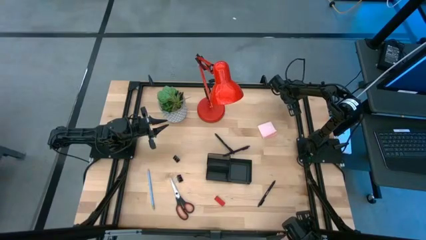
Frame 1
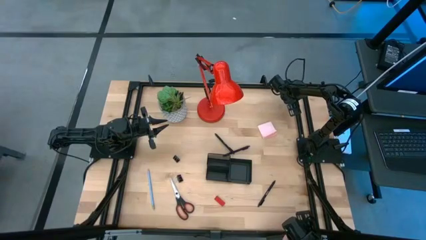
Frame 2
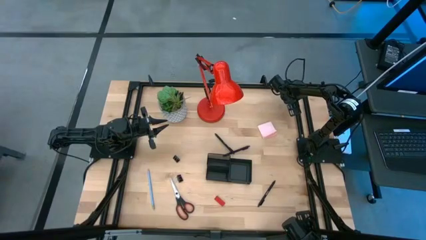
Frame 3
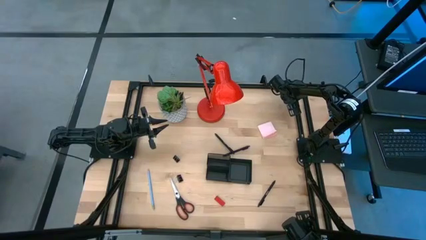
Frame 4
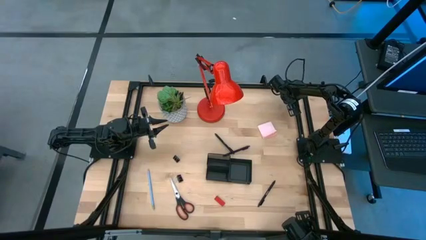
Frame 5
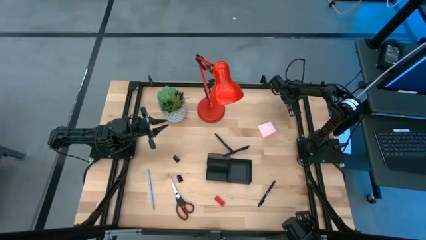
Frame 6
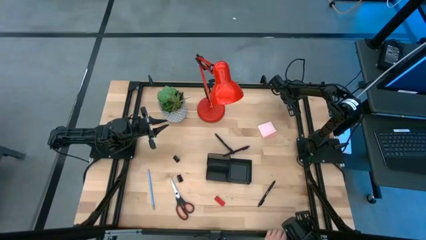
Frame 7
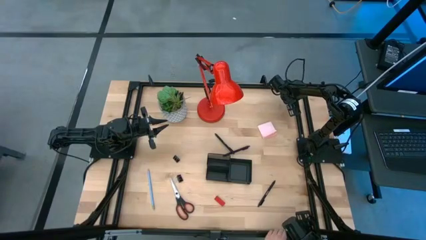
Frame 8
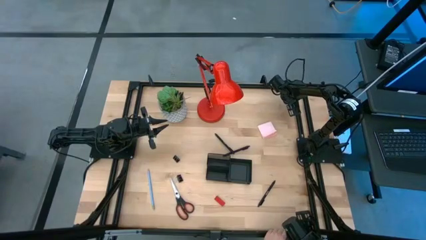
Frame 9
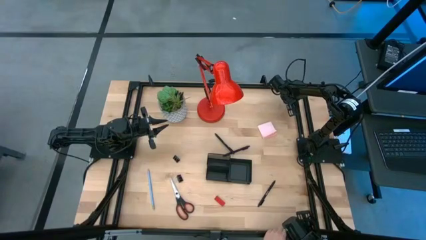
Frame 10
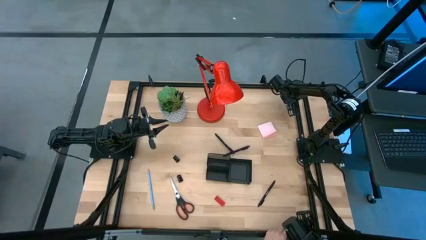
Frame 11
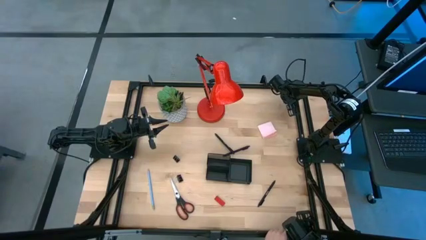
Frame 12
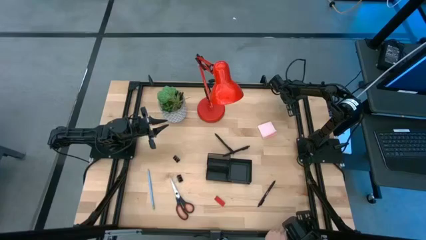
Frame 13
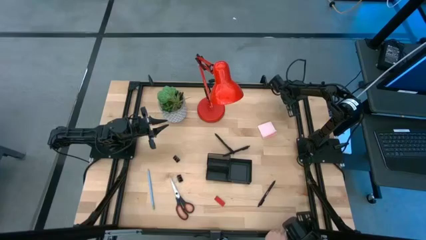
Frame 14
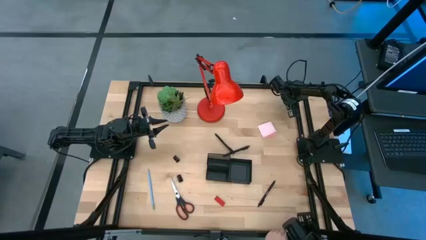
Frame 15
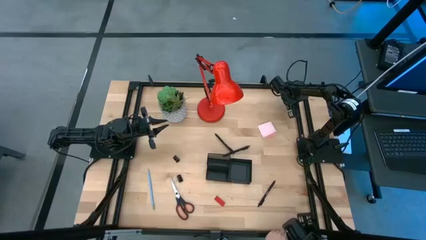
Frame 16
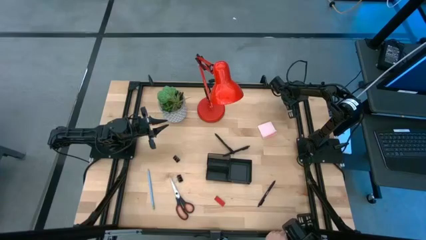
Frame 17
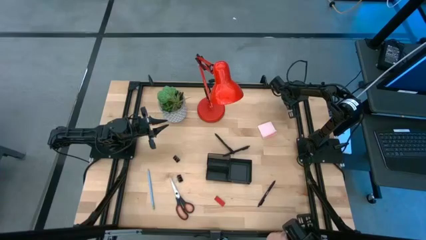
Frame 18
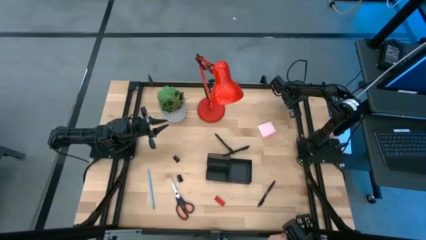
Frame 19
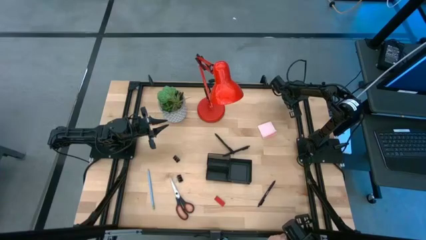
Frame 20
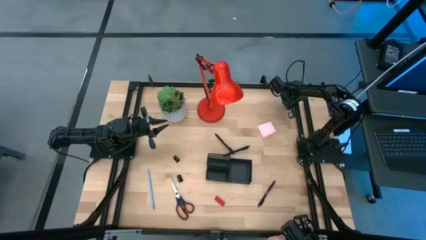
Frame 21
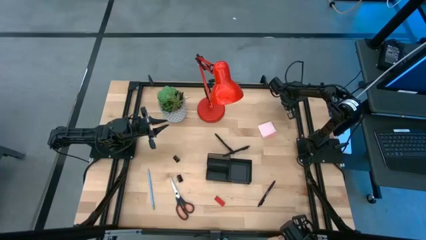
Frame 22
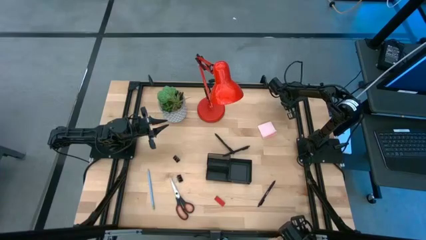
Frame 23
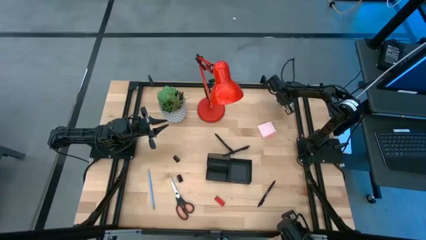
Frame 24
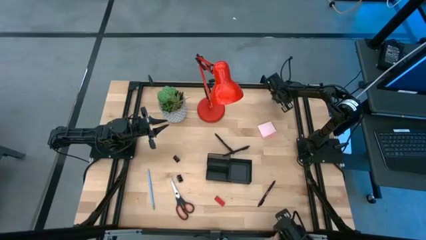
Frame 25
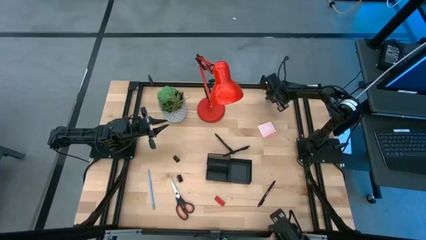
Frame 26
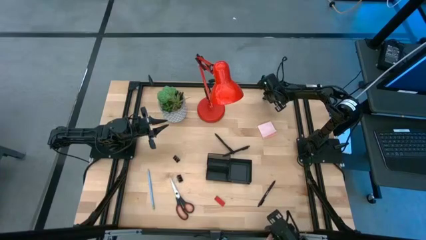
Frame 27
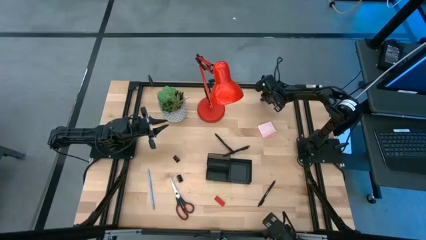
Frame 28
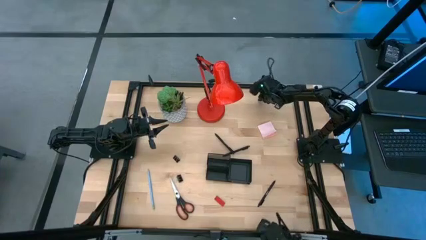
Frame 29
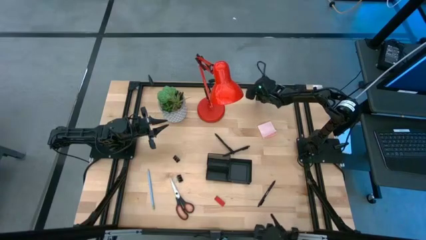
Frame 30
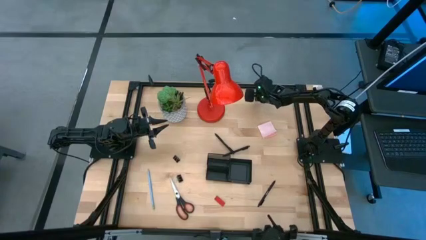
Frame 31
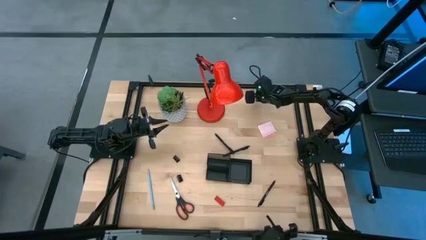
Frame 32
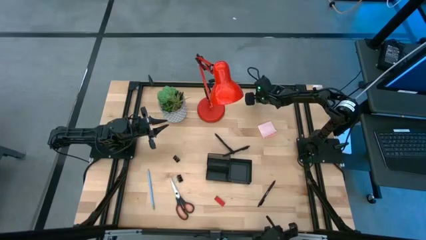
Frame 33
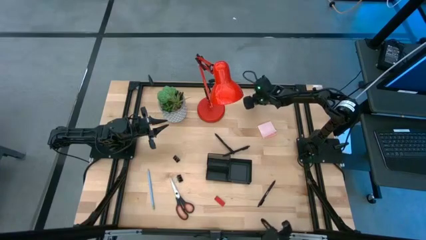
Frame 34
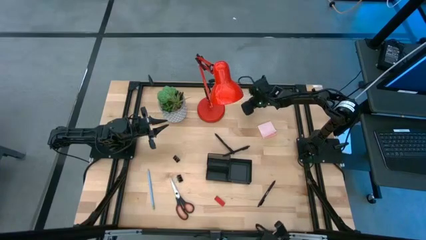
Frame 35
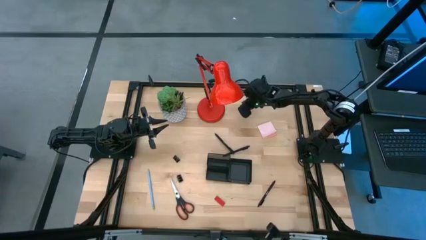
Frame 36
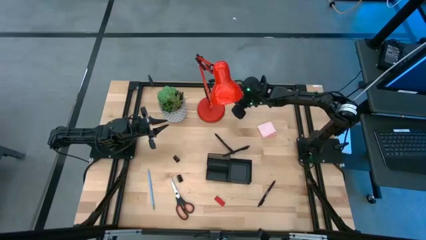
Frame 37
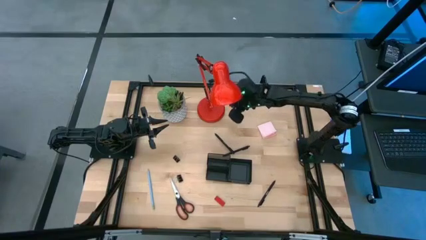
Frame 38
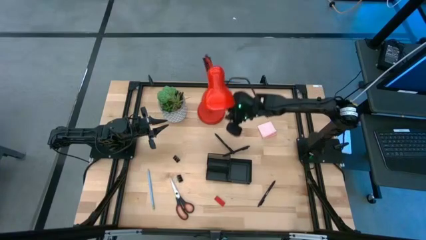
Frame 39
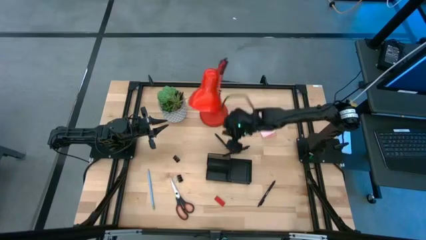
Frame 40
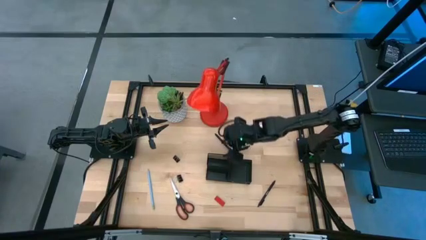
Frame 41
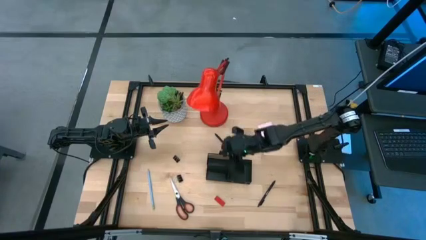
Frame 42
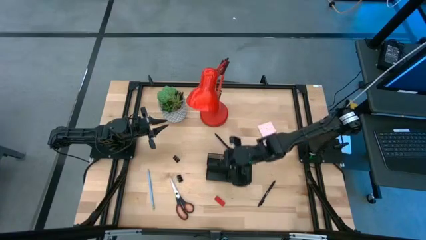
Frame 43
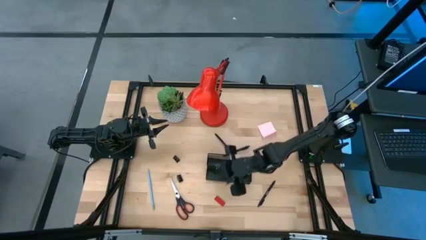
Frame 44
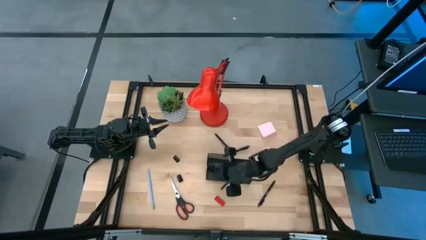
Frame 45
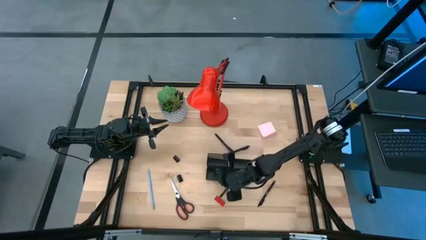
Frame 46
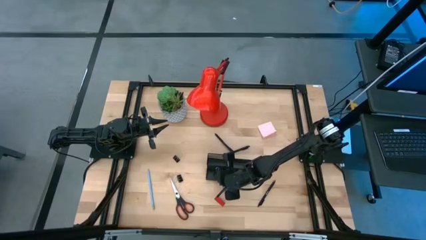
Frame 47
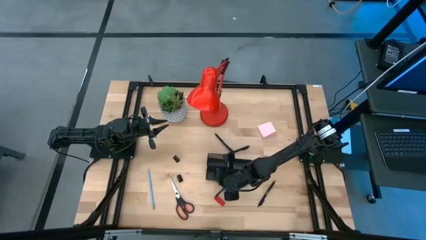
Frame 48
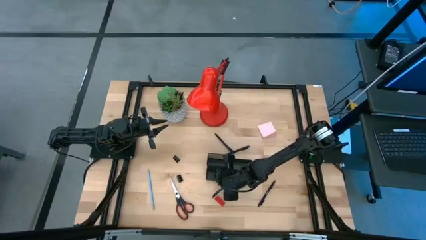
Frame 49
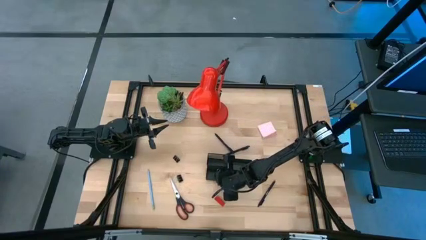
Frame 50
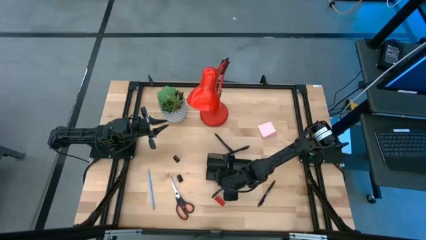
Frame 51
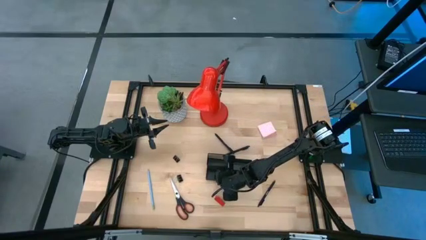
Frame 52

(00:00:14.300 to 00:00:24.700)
Task: Pick and place office supplies into organizer
Put the top black binder clip into the black desk organizer

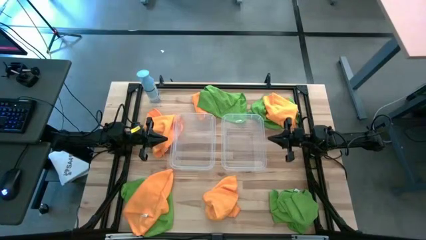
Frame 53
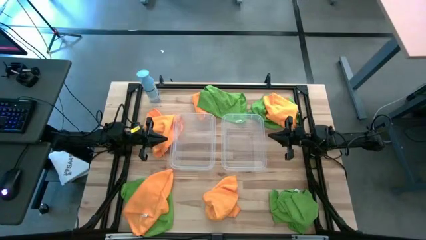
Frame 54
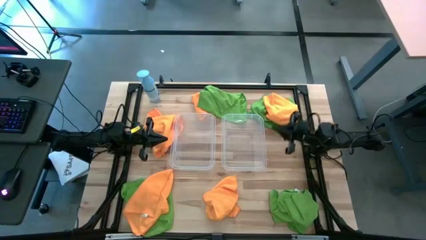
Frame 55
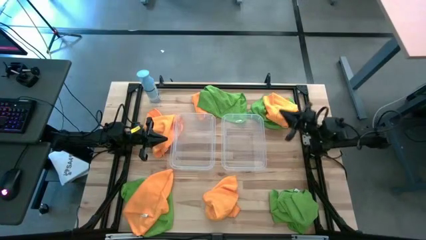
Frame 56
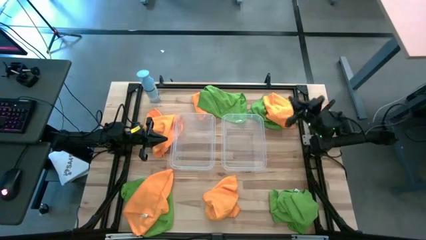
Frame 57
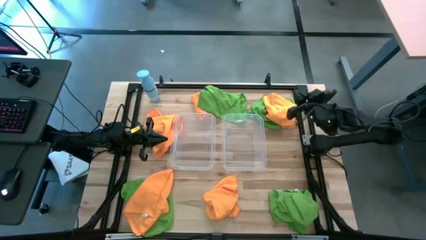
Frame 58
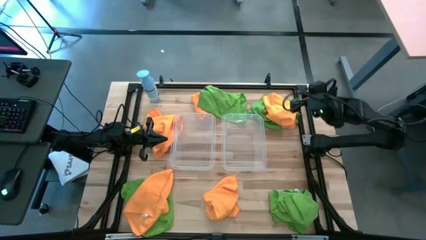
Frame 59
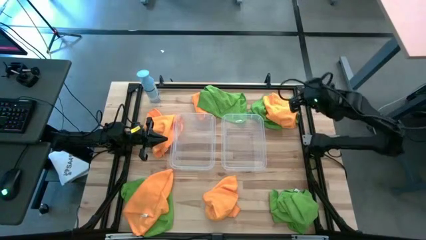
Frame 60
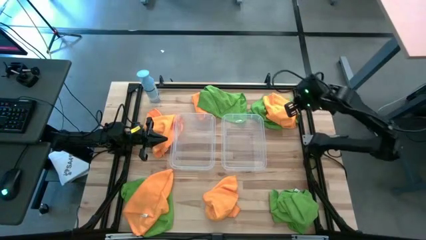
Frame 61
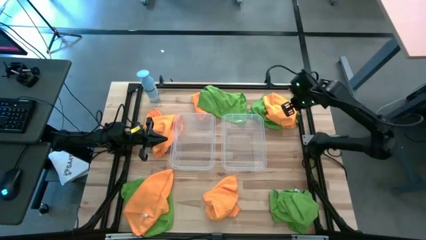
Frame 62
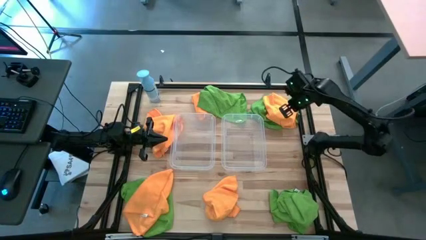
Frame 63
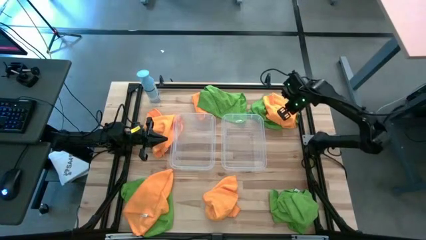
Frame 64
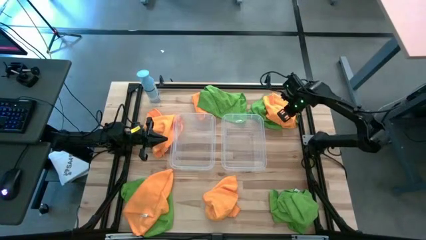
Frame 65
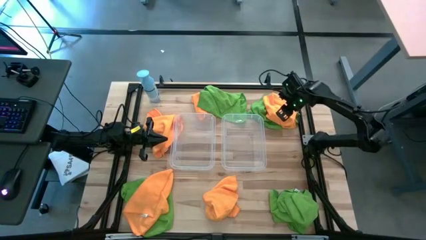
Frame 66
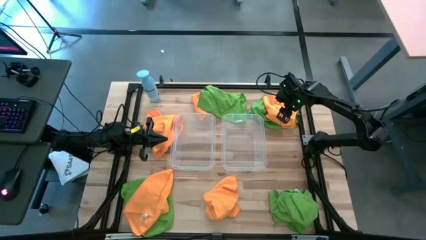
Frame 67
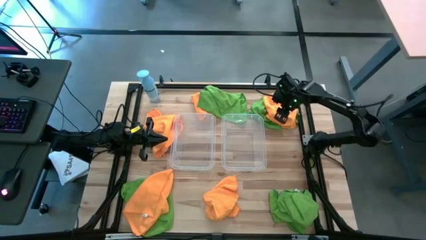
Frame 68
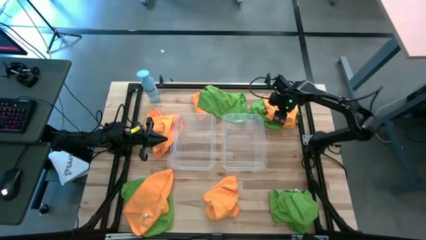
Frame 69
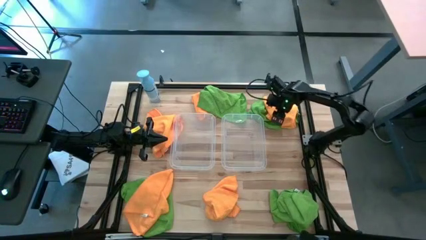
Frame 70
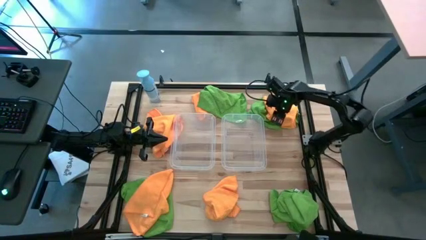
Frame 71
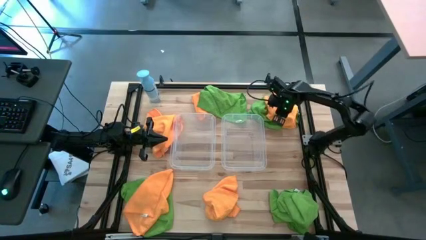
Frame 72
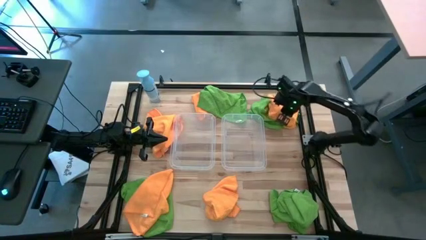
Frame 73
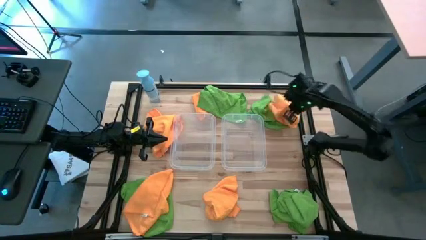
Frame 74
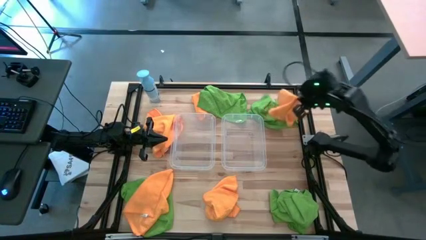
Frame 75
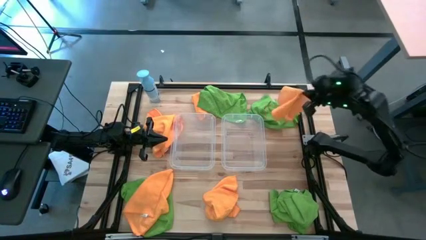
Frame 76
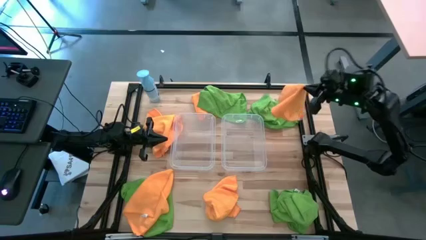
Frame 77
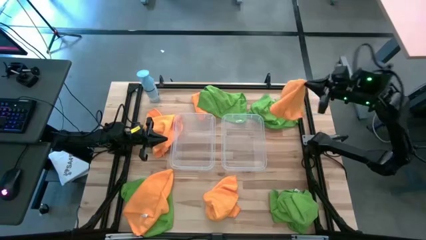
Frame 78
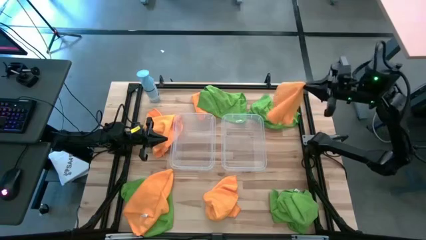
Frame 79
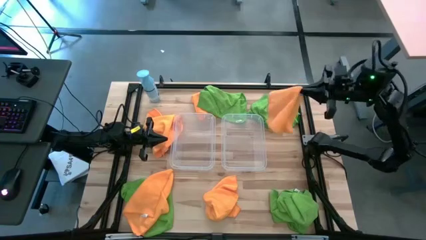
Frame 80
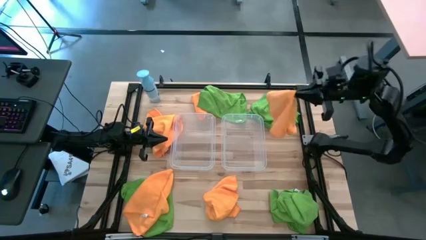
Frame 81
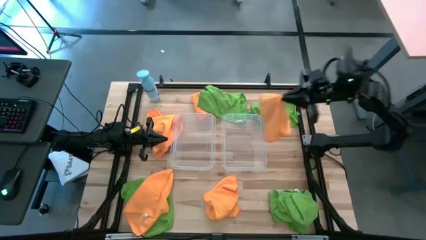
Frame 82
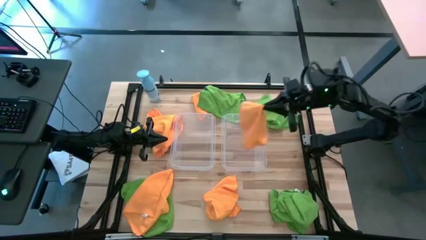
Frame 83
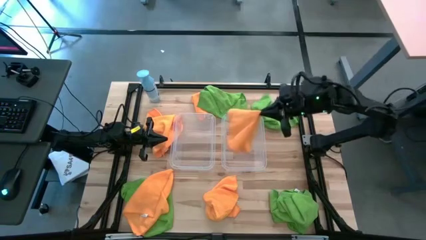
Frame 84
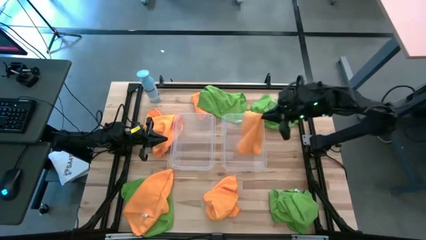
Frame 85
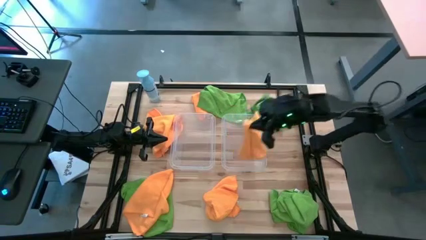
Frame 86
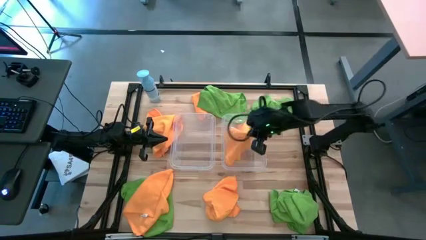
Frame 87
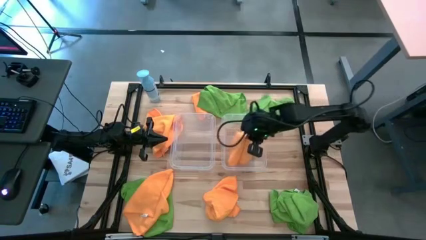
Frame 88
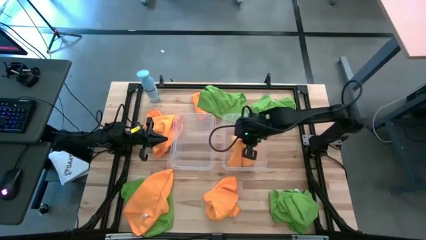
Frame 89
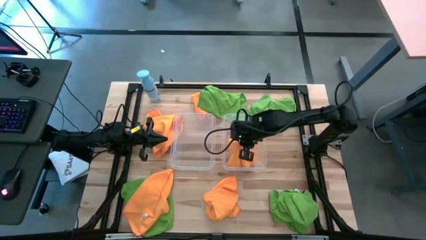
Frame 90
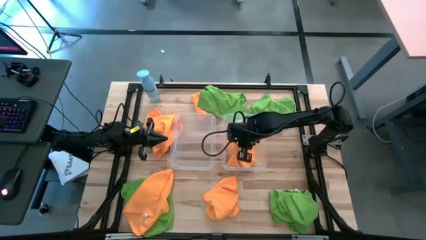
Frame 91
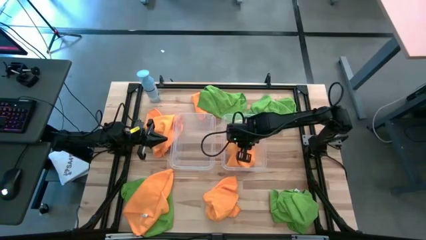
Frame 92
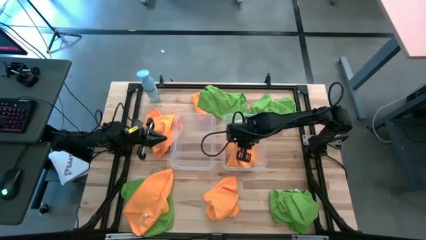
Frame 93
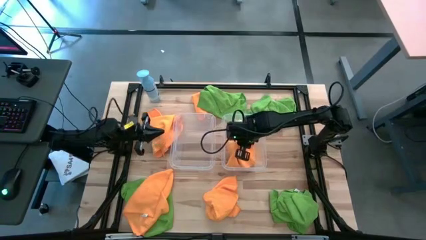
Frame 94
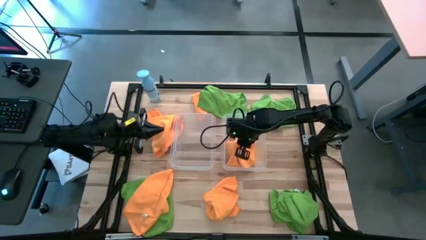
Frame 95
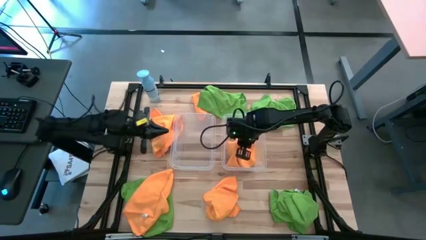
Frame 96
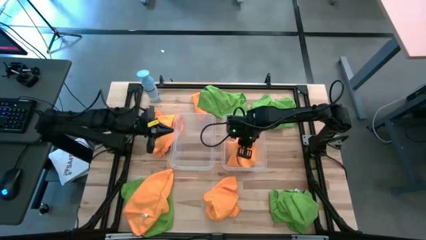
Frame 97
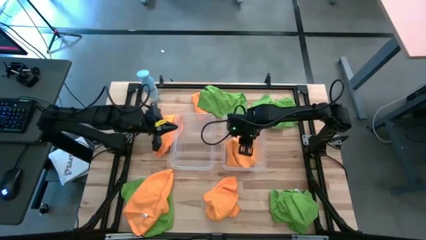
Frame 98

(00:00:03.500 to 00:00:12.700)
Task: Sort microfiber towel by color & place in baskets
Put the orange towel into the right transparent bin
